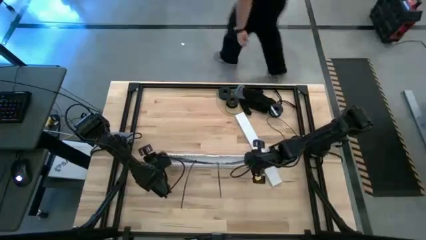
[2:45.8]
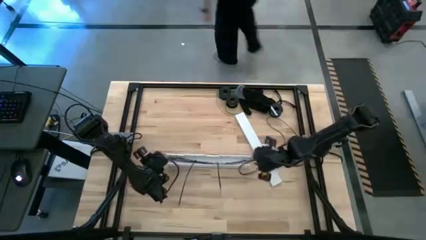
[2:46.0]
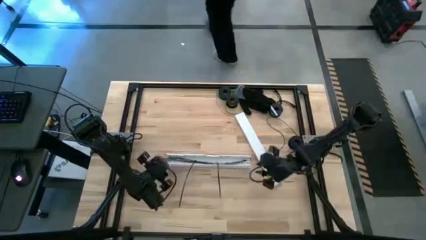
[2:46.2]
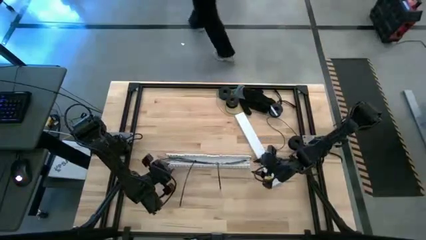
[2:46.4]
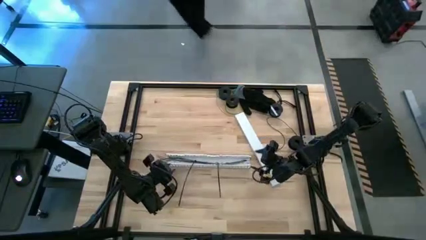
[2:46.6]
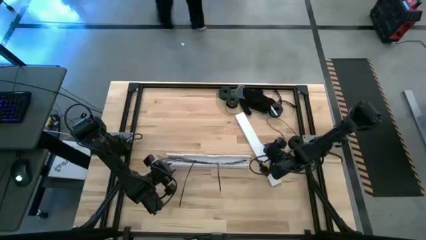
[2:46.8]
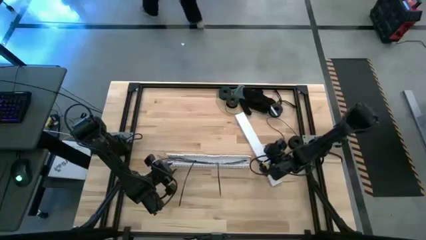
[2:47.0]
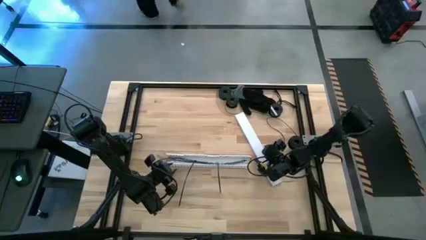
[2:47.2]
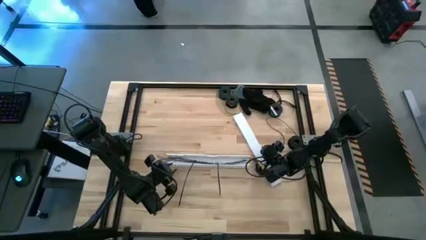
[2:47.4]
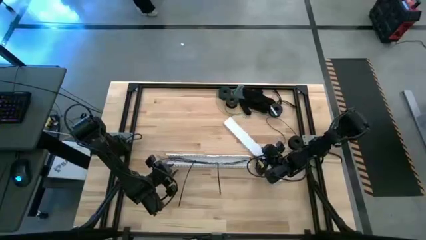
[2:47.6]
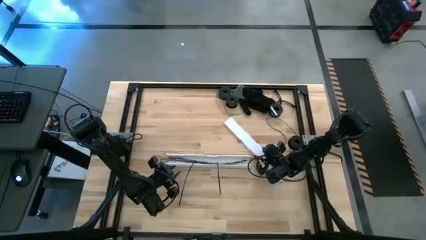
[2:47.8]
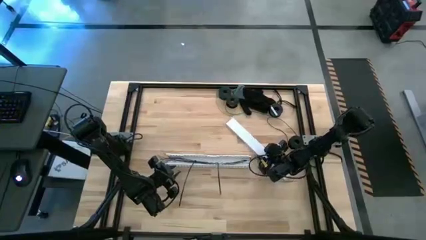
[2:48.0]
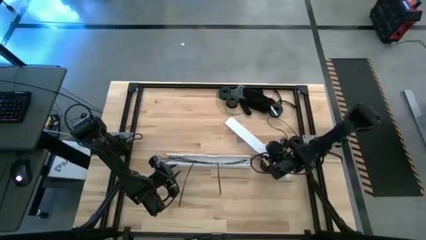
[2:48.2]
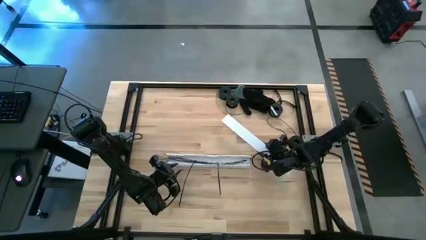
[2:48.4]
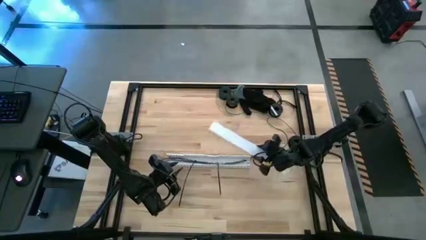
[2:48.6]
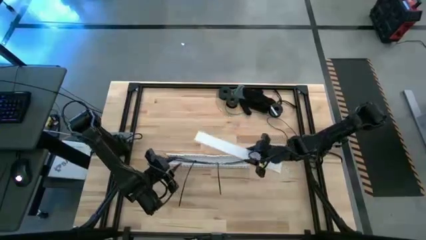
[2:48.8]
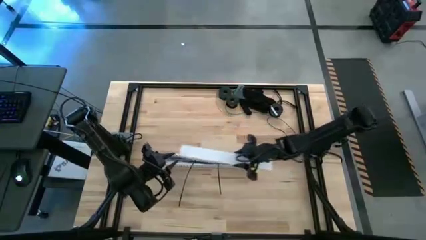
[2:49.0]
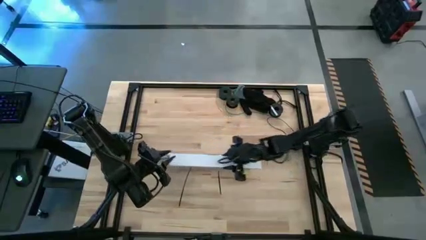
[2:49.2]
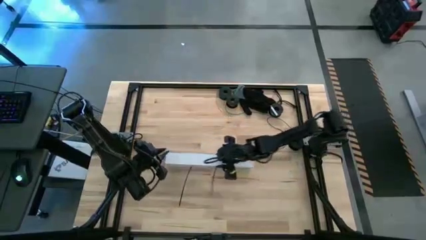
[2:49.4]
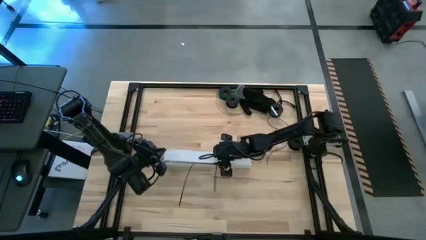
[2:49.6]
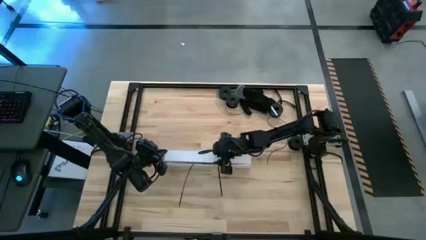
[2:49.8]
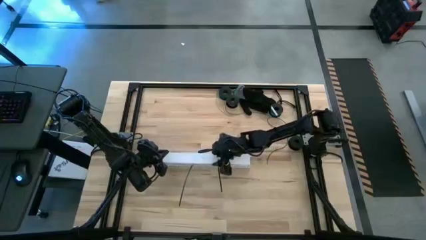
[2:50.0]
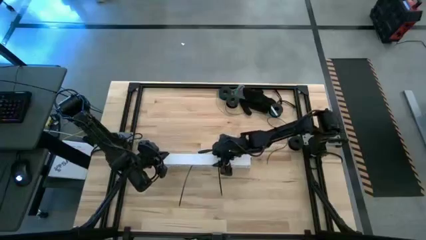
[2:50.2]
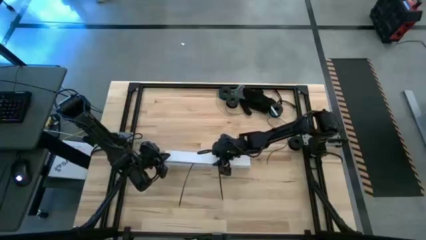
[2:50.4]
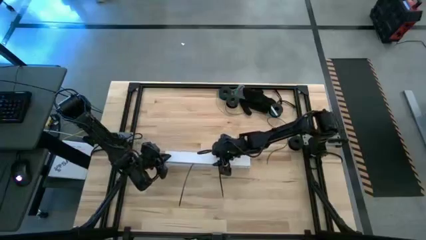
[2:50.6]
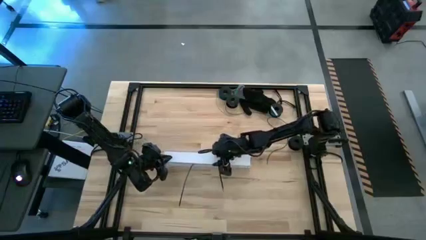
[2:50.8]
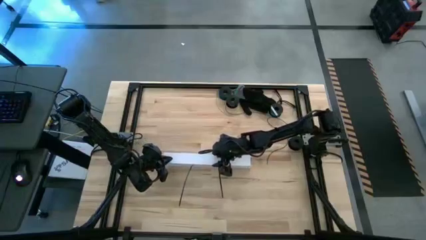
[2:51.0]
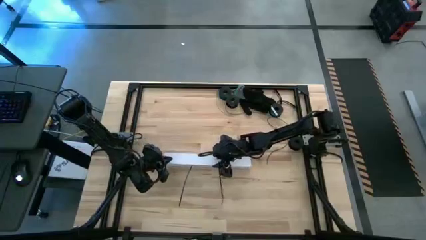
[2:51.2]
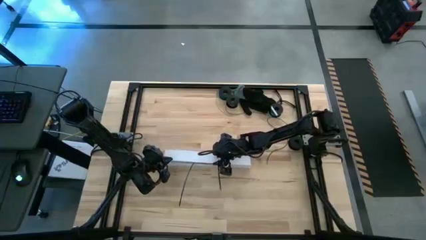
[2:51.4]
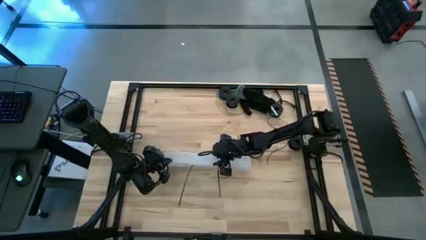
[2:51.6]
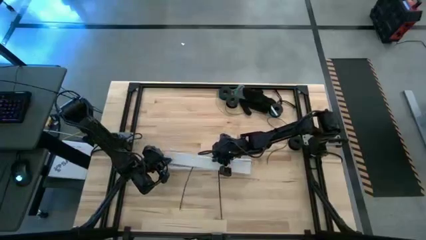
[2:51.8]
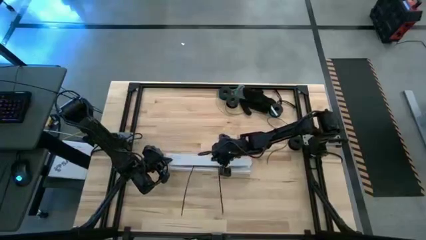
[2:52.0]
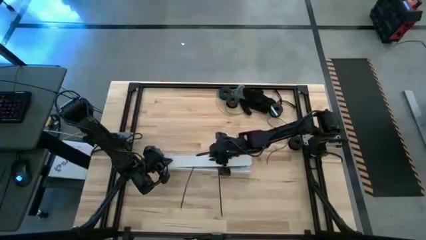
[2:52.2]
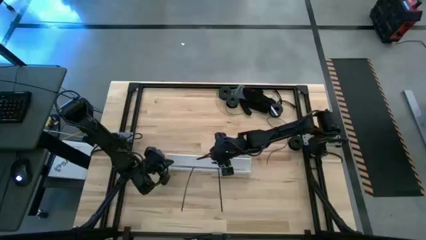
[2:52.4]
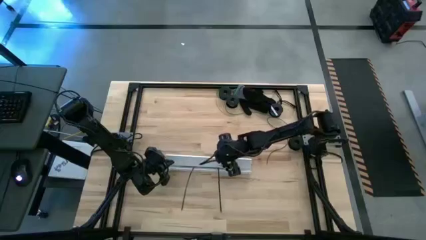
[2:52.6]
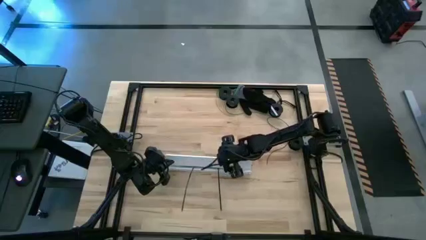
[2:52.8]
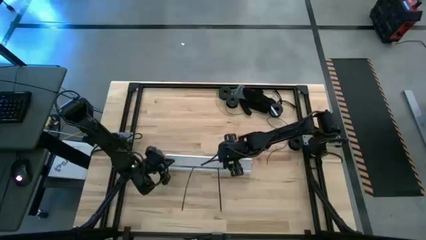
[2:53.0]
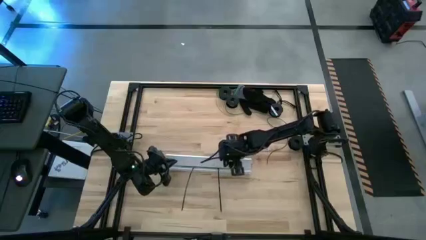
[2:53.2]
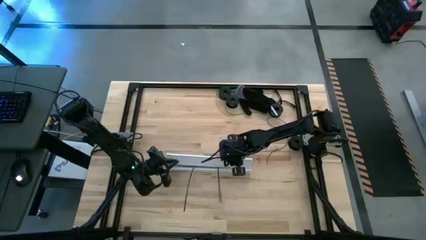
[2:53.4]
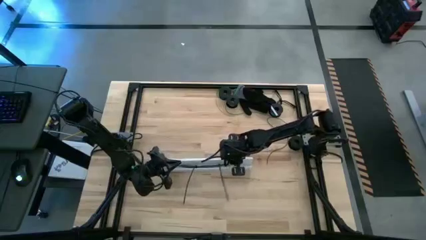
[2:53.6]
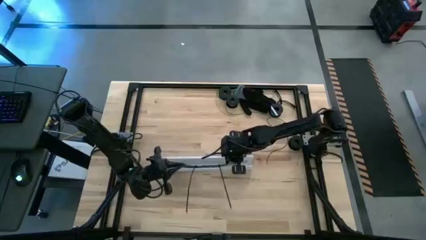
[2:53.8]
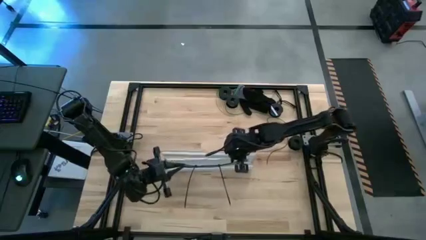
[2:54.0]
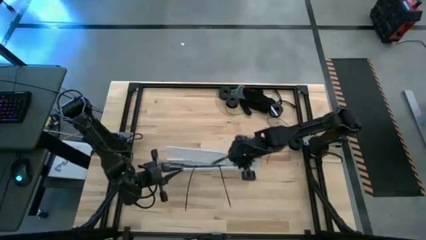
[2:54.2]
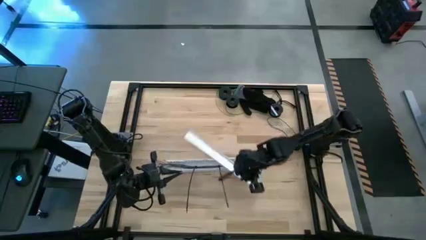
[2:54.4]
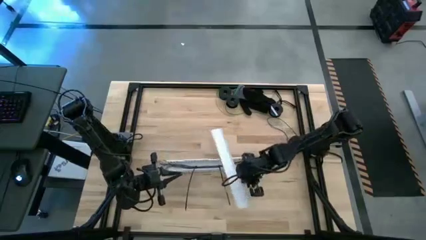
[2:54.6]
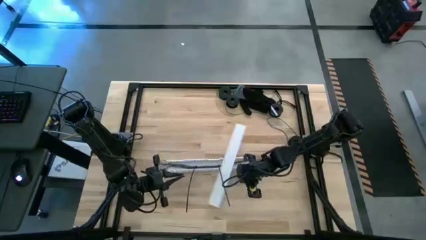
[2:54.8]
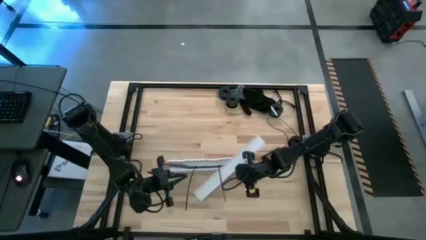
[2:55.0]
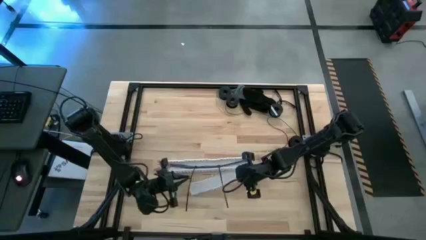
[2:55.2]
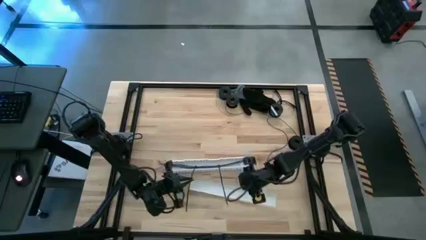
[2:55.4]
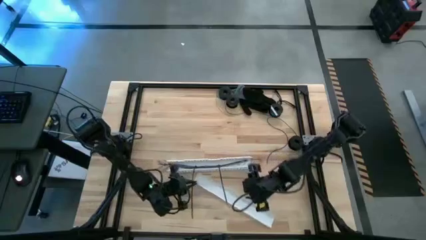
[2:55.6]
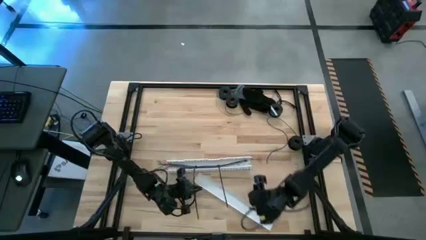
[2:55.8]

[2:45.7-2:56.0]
Task: Ziptie cables
Close the white cable duct lid

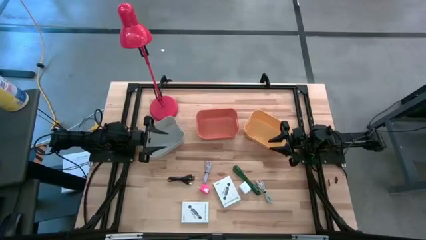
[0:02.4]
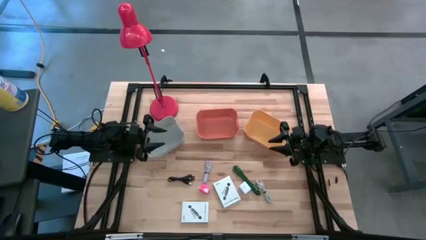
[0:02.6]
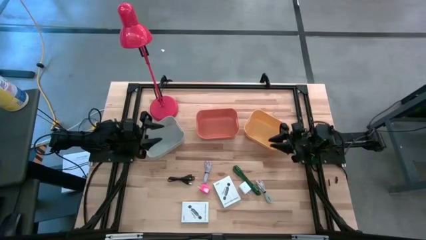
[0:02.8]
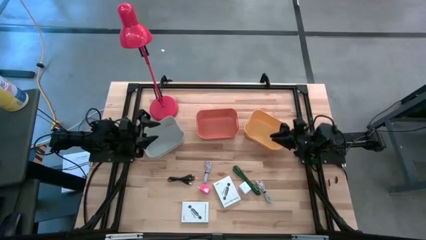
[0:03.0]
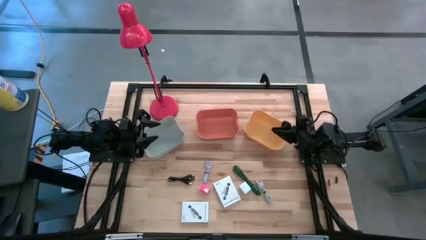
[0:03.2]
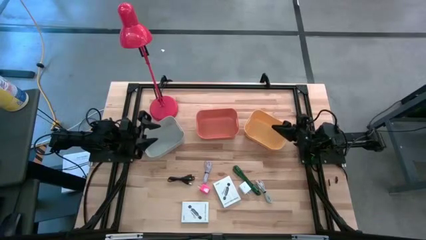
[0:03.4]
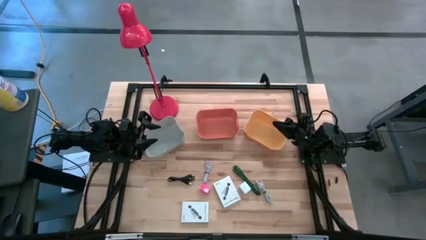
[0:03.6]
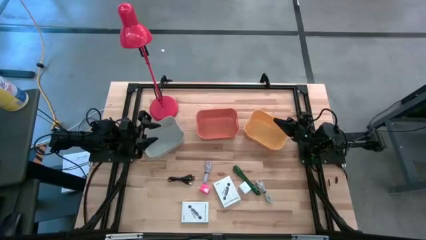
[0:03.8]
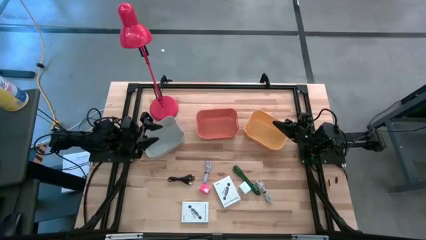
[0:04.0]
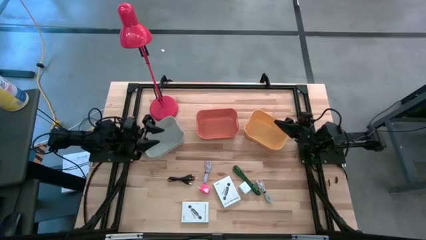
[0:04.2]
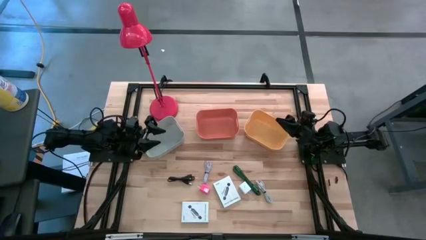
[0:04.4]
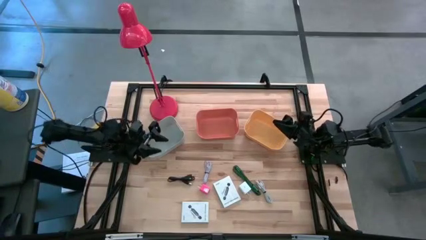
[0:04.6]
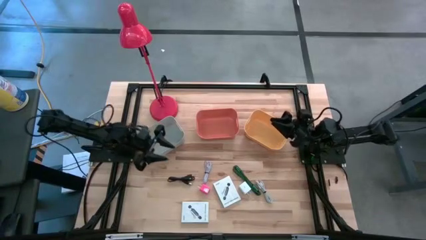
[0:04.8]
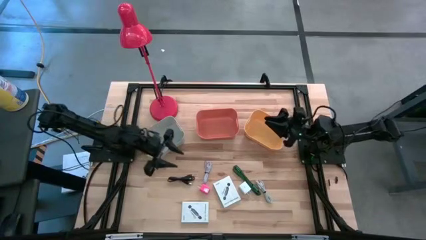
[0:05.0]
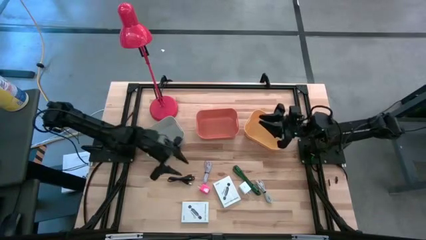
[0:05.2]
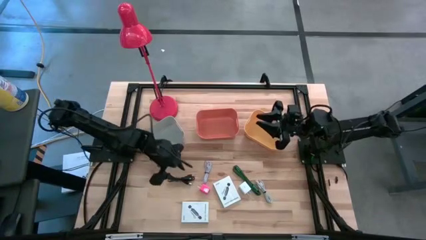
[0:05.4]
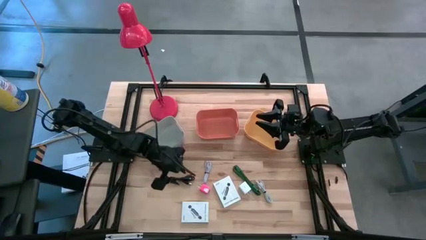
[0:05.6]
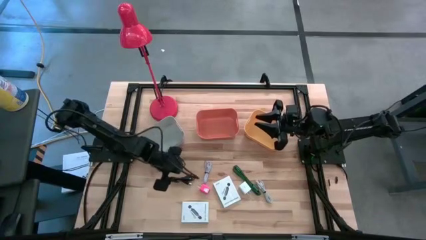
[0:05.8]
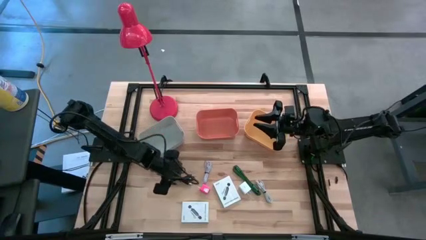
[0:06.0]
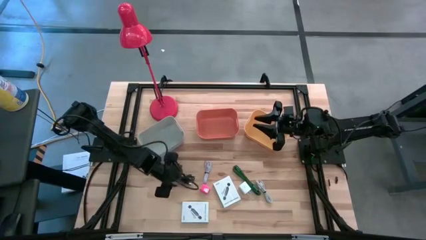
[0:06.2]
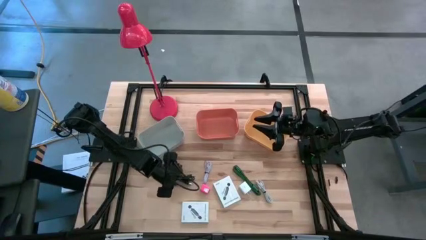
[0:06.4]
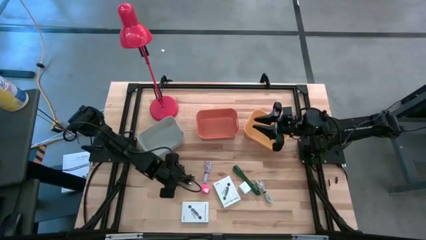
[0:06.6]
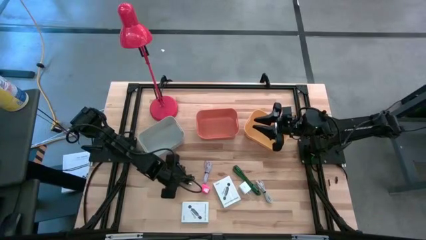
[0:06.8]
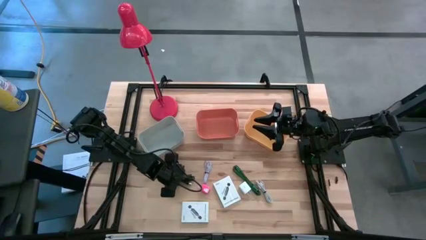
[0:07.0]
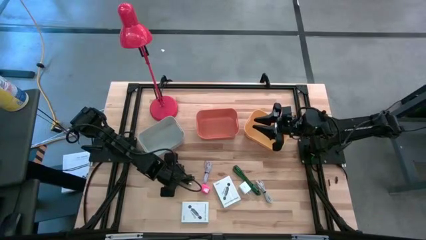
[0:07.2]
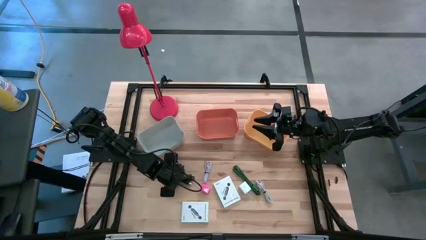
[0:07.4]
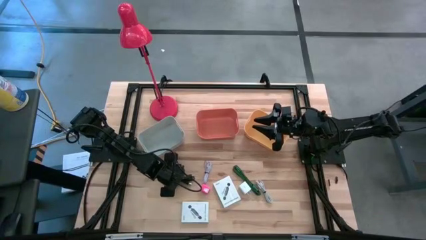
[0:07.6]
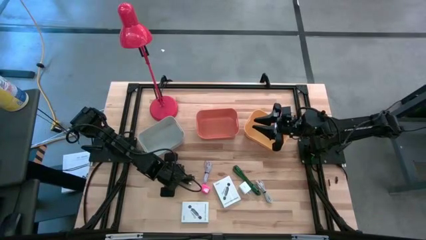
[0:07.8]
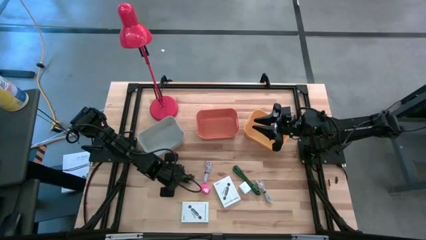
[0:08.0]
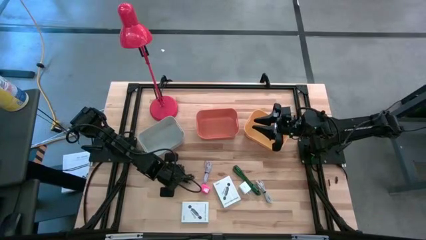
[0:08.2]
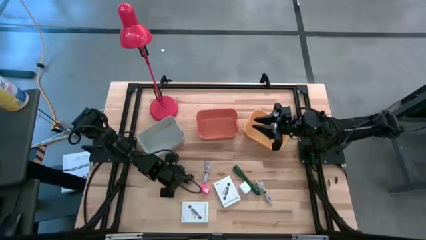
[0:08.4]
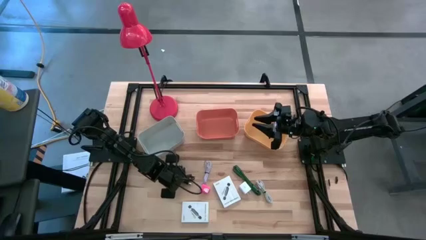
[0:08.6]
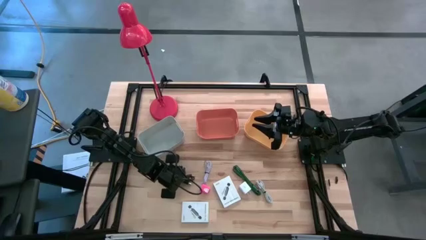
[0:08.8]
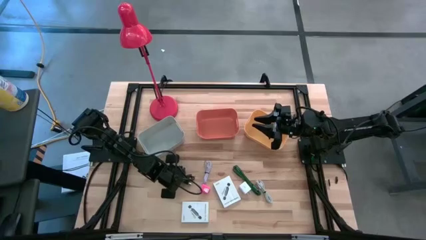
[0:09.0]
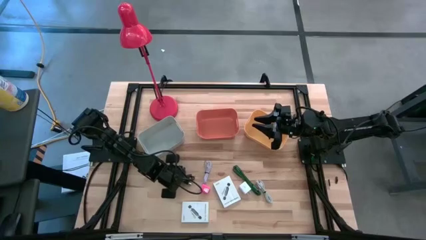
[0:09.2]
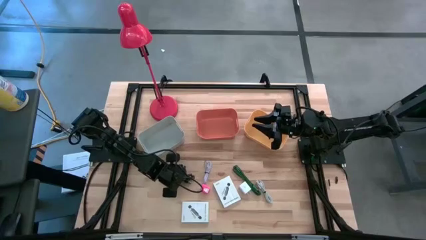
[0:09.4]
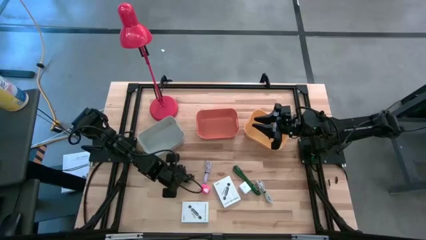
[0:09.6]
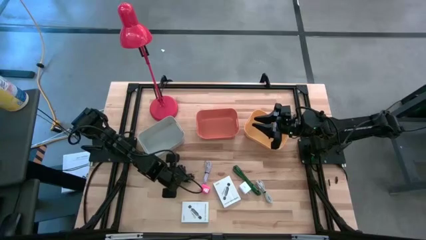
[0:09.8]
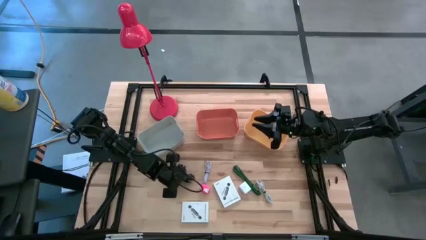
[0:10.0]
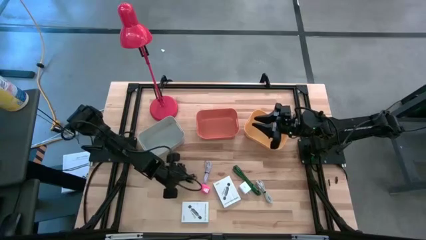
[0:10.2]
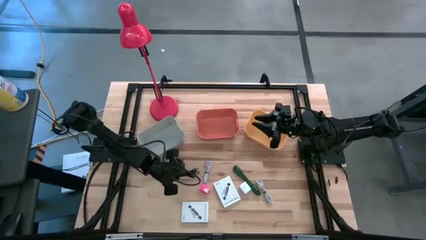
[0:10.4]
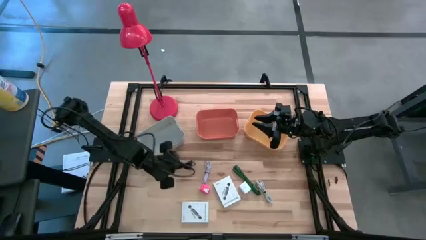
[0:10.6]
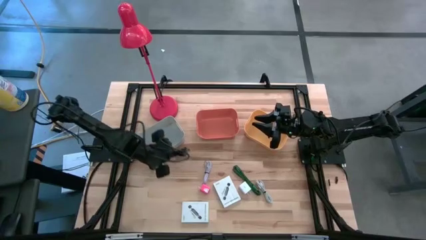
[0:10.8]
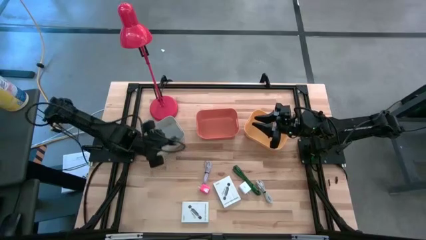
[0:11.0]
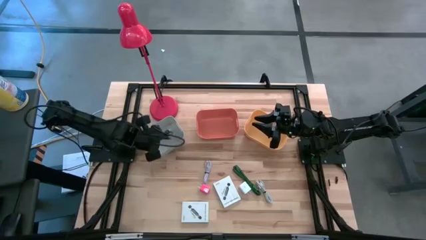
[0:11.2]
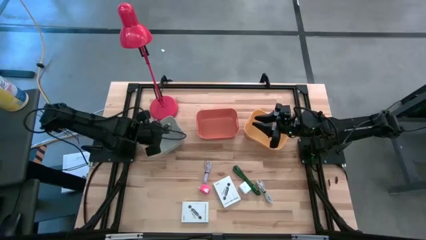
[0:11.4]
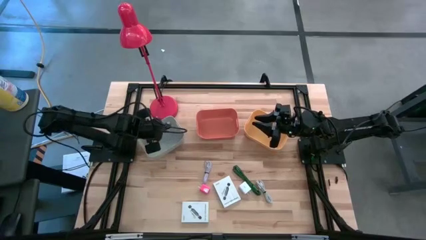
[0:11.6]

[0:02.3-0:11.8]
Task: Pick and place items into bin
Put the black charger cable into the gray bin
